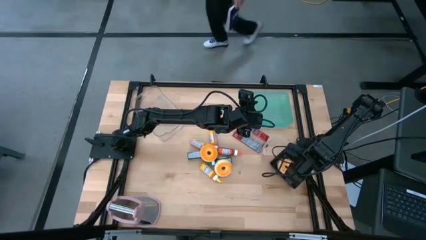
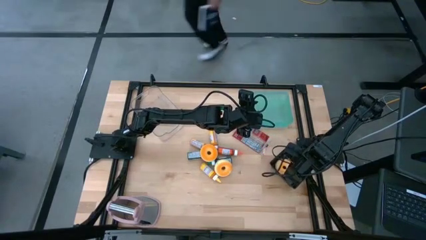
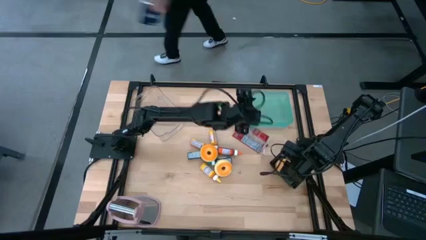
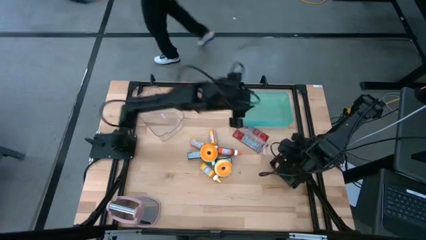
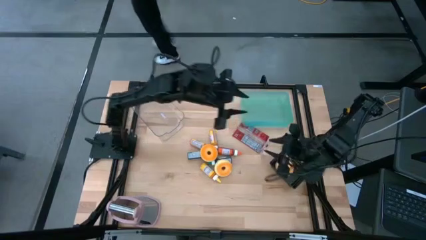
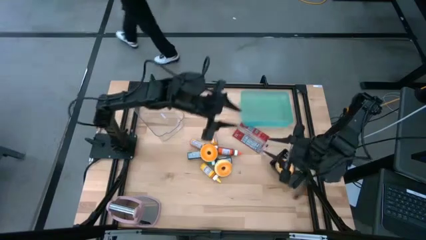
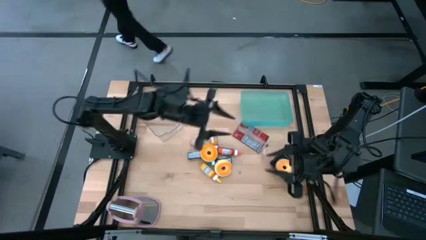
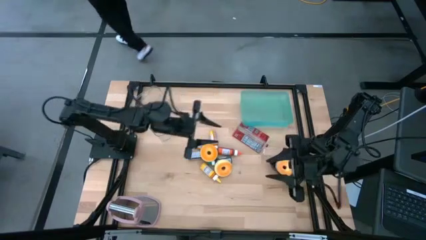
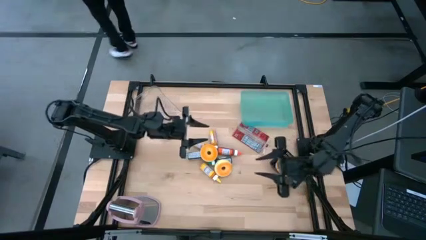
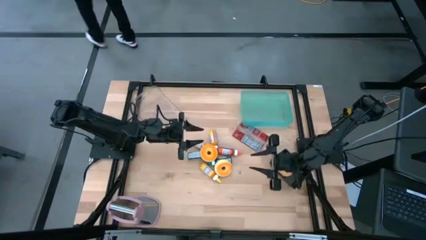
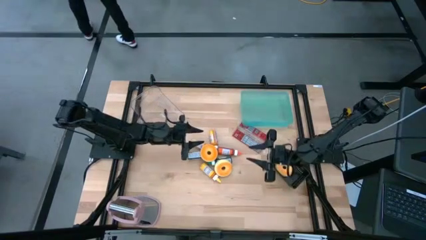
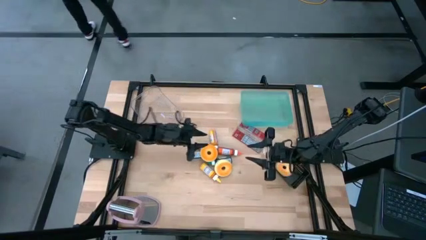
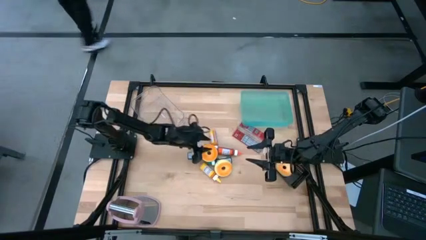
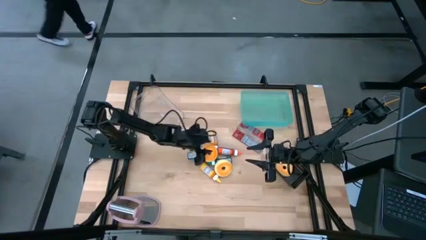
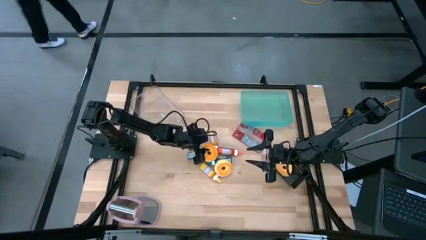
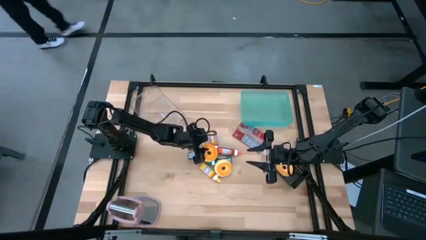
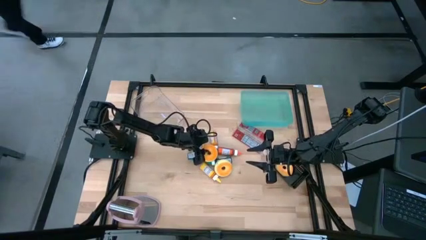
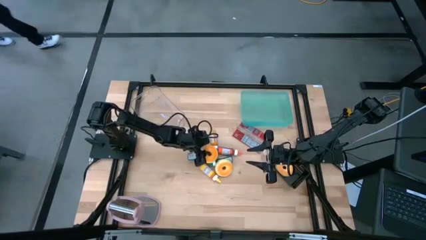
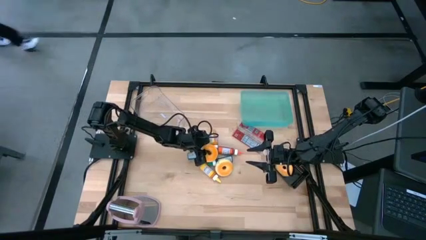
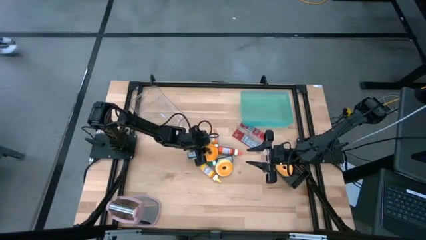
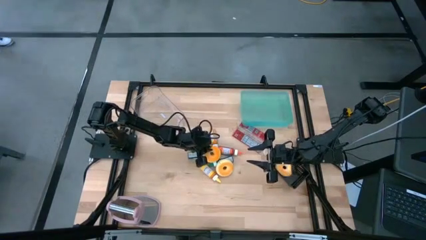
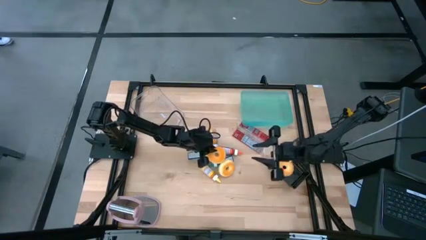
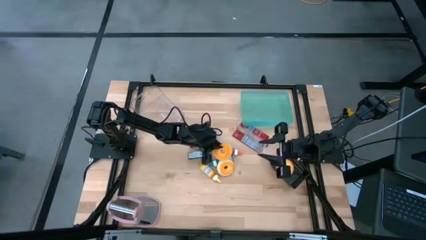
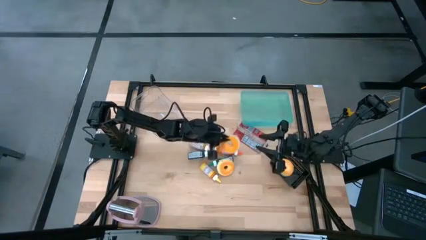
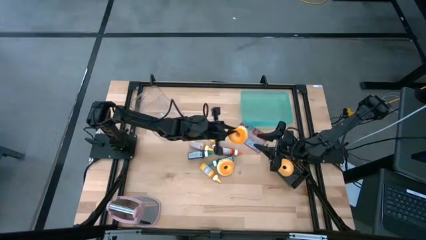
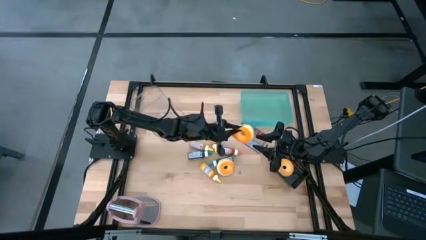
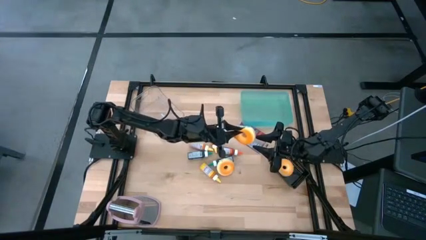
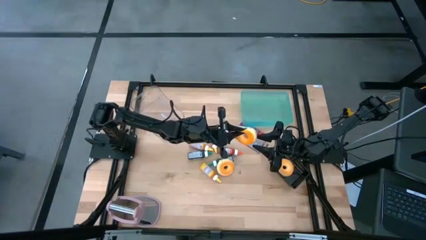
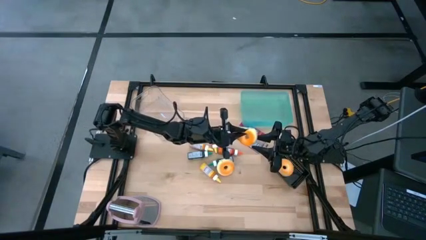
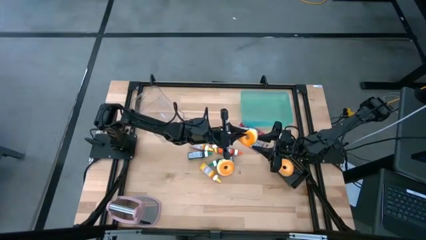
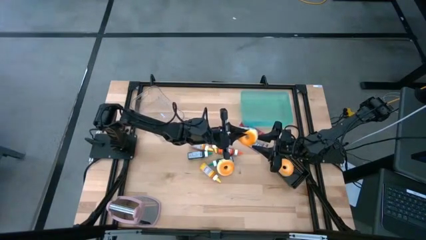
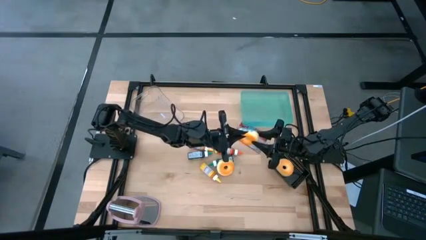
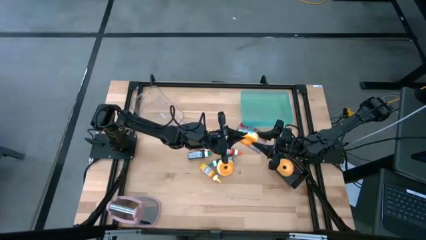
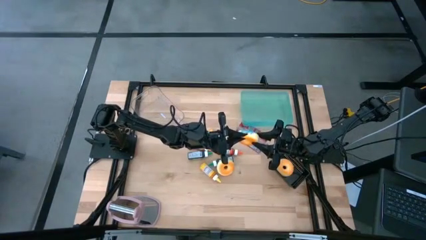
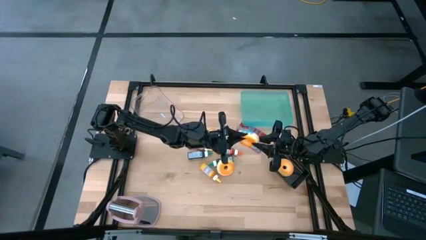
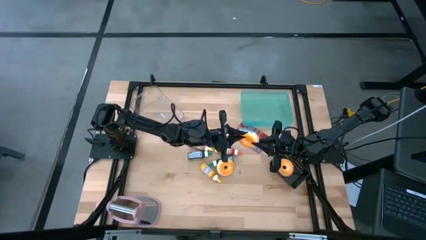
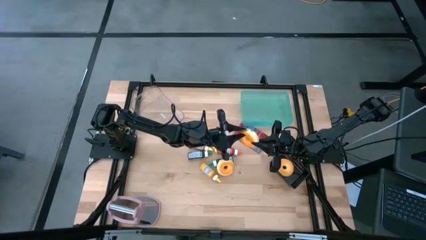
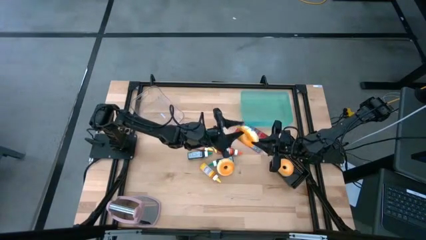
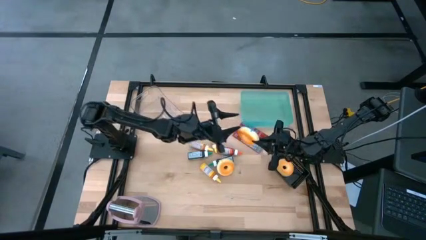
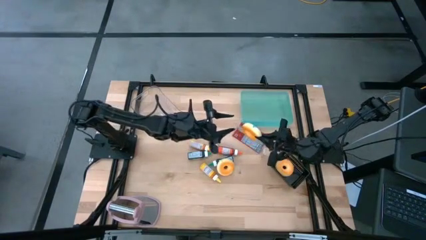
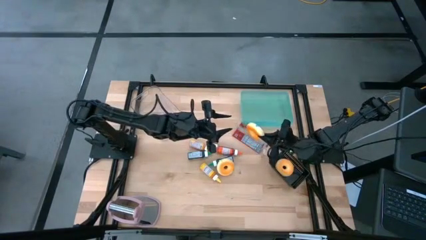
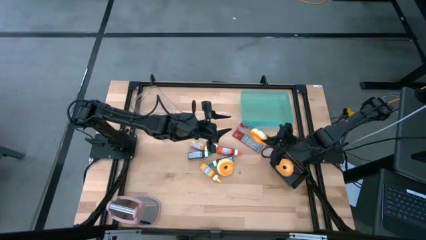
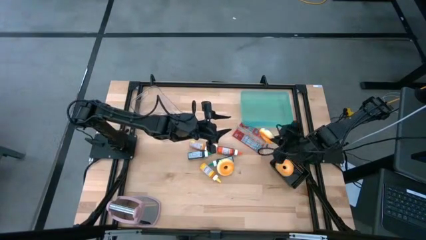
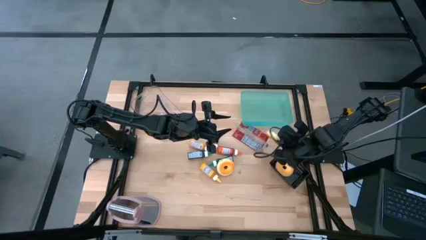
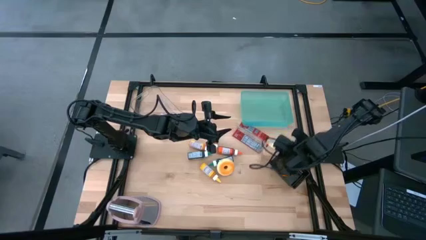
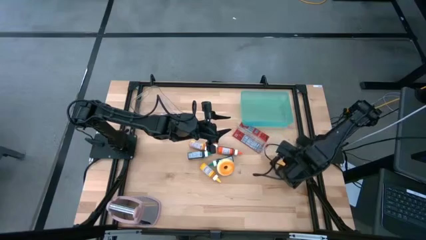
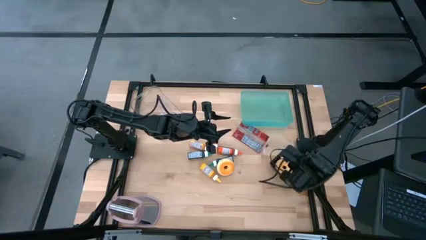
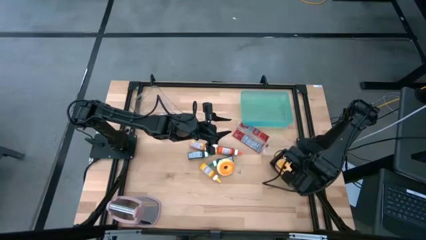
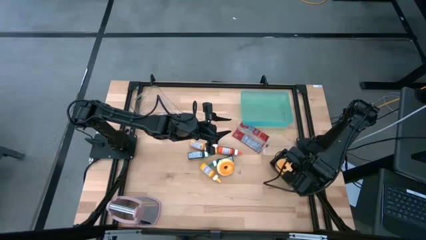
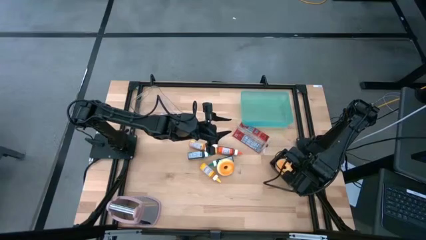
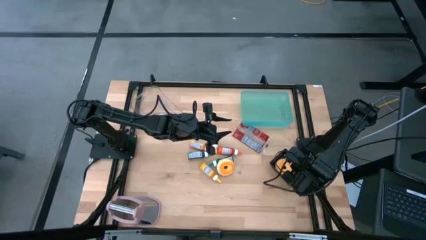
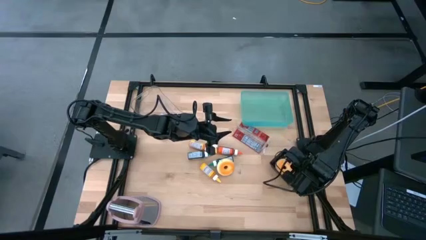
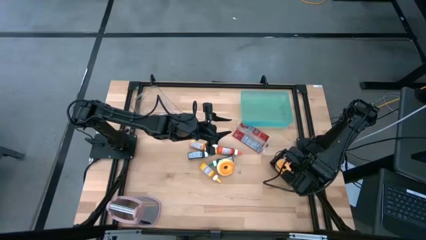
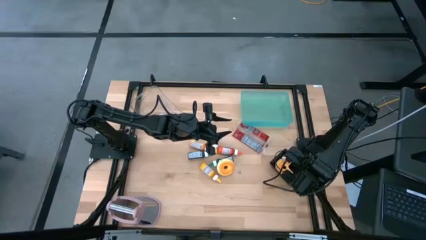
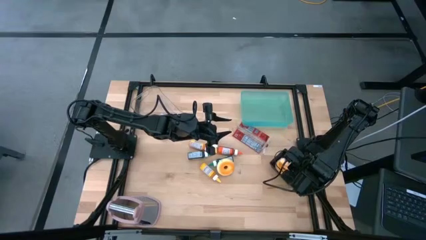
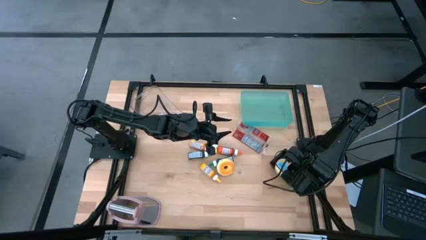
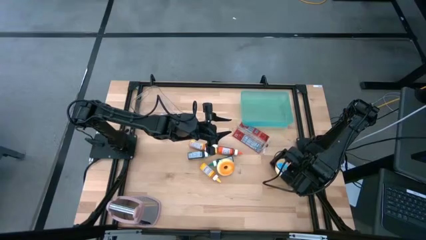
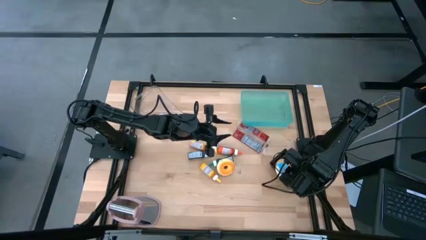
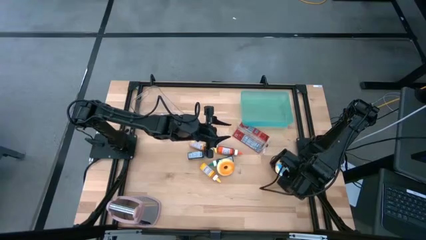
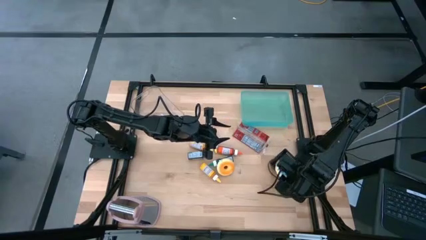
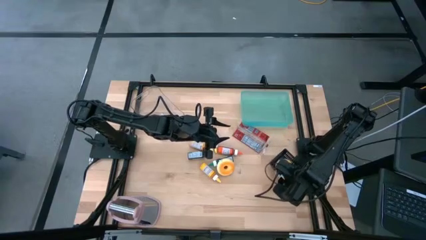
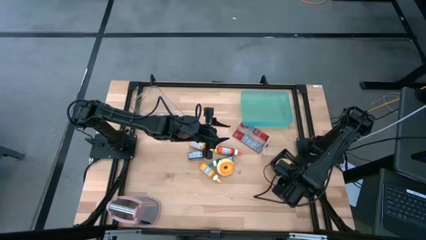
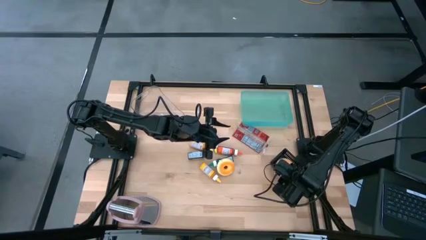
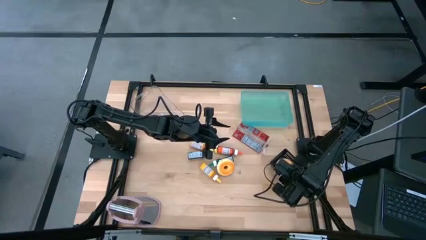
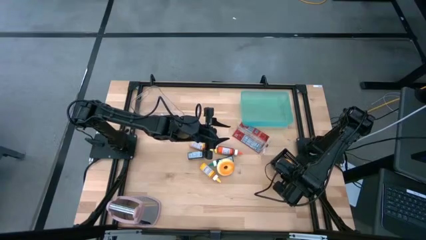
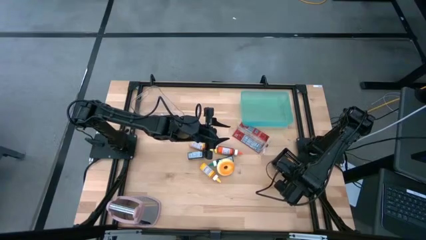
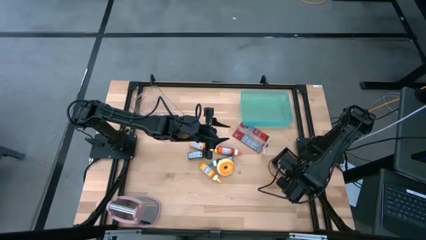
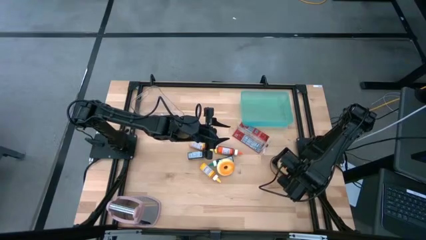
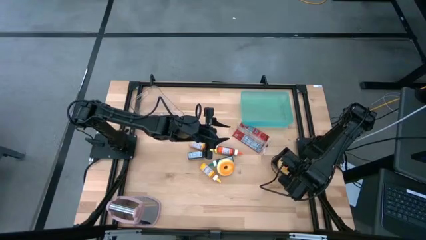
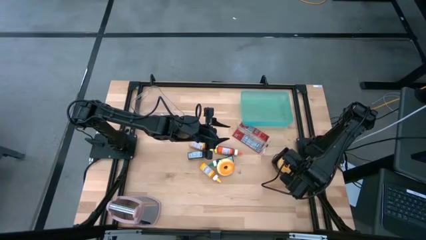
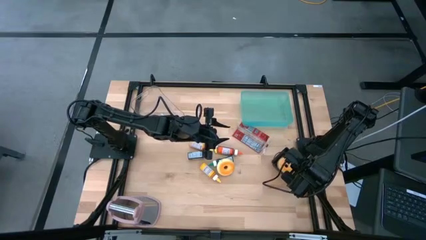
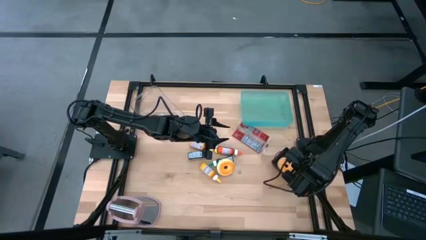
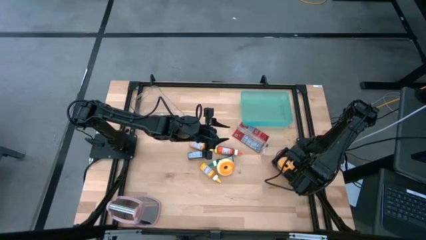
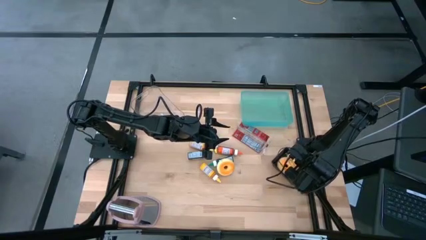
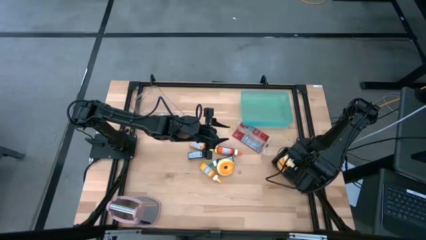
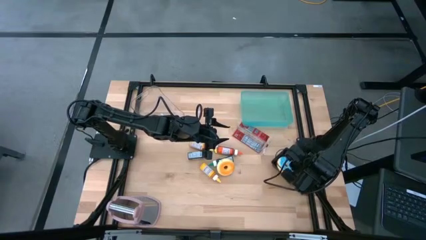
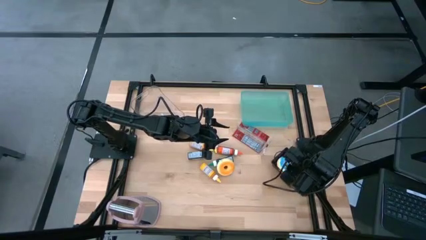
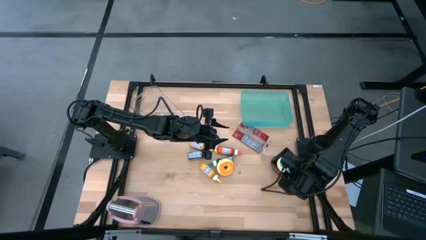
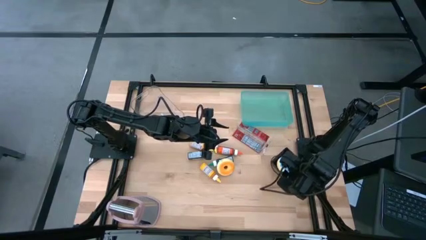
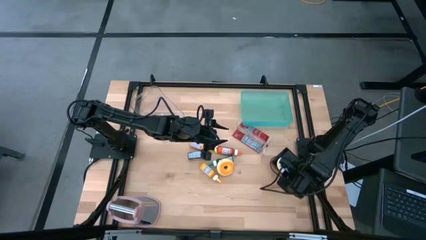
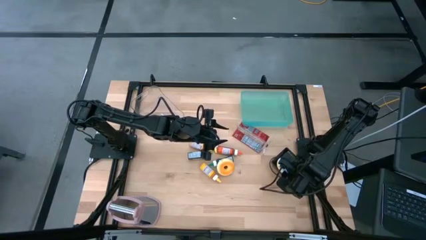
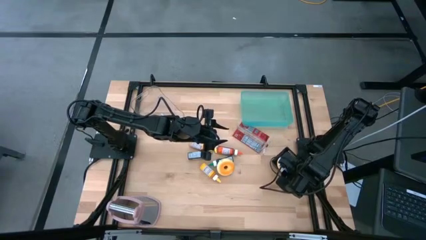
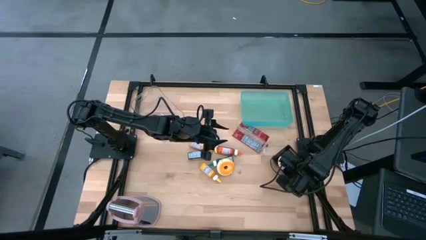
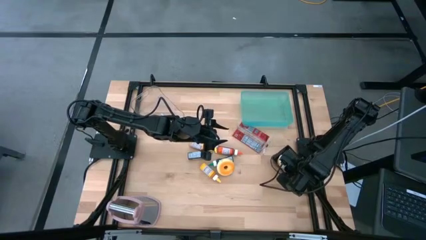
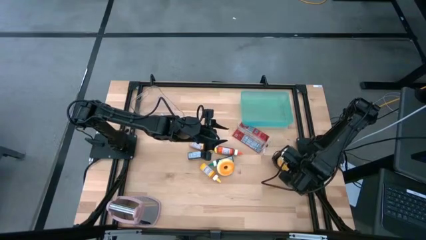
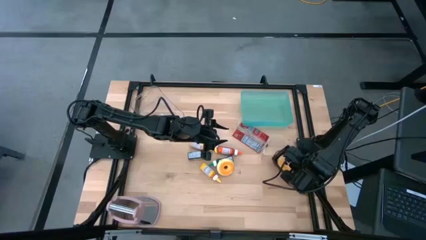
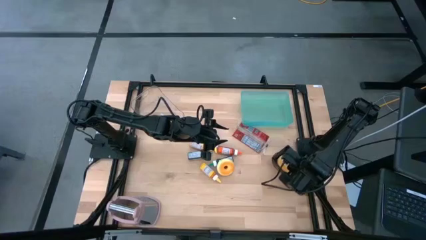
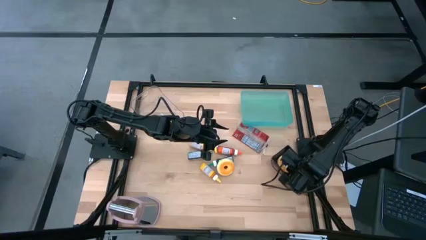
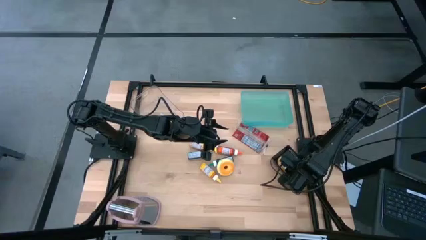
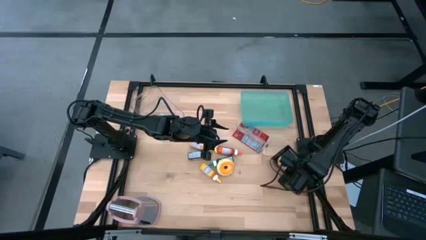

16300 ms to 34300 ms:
Put the blue donut into the black bin
